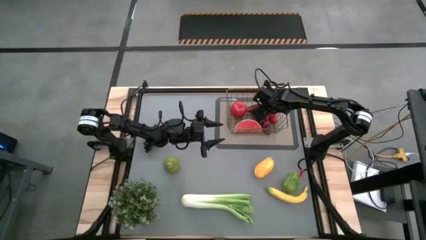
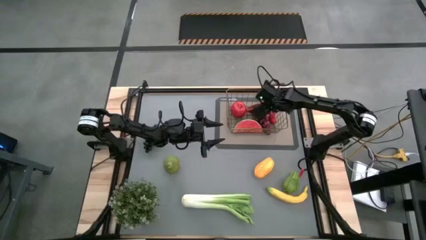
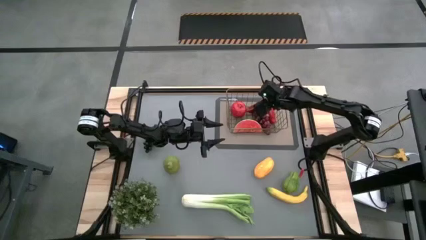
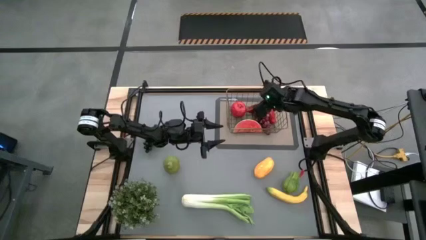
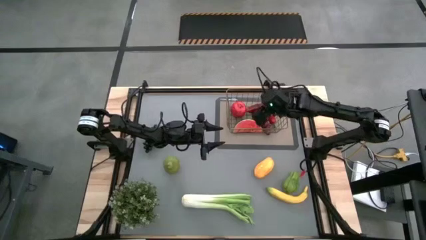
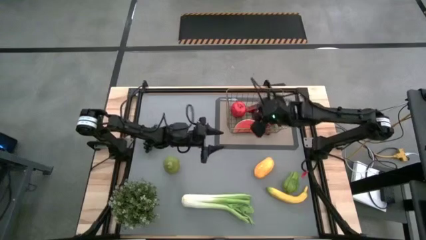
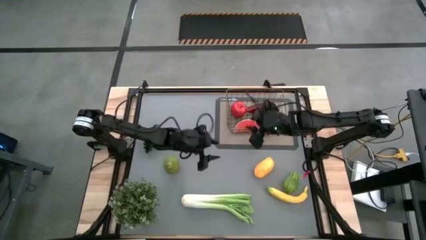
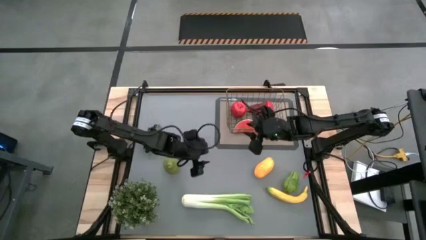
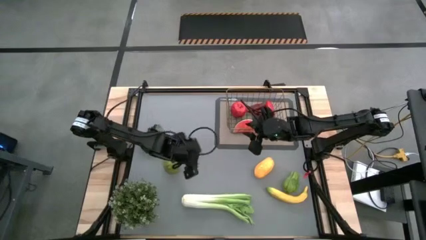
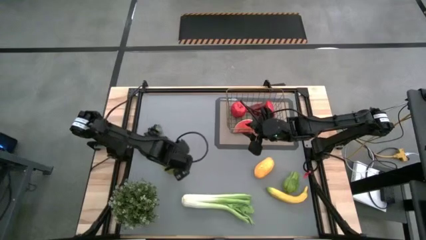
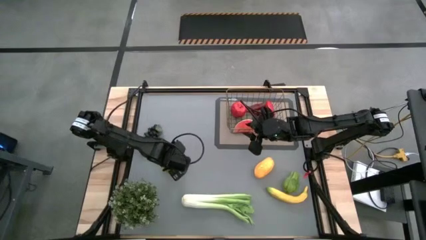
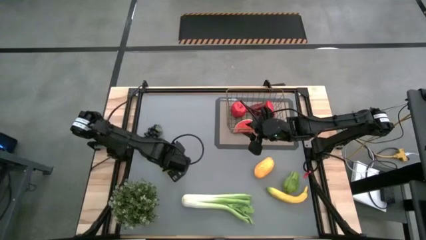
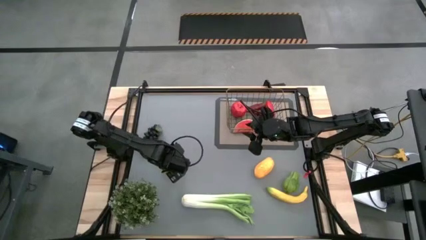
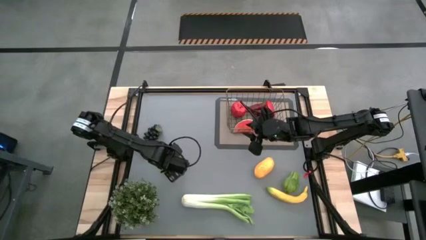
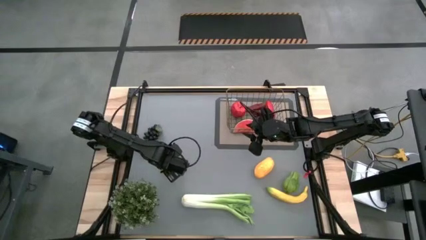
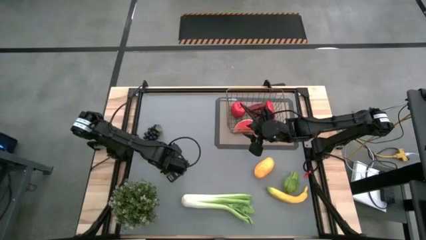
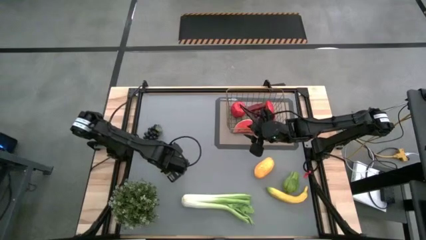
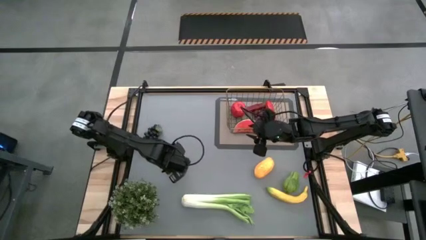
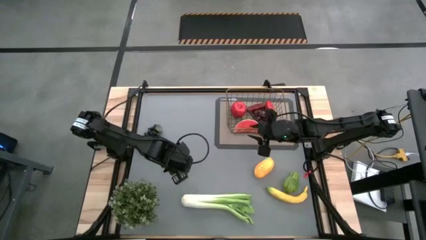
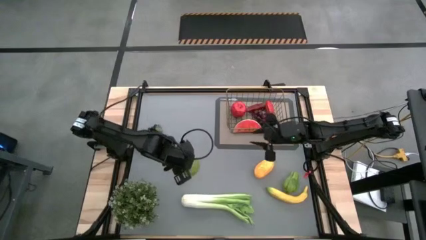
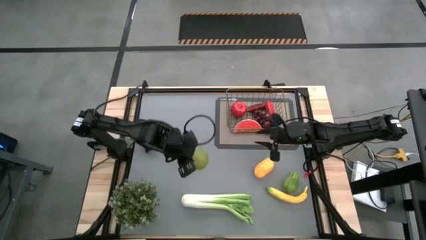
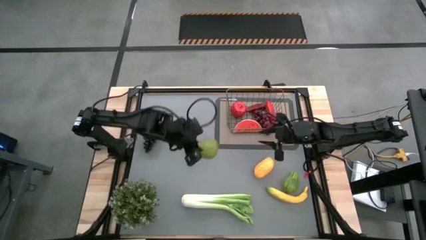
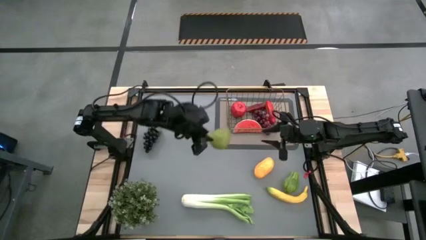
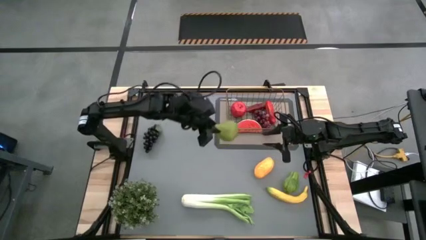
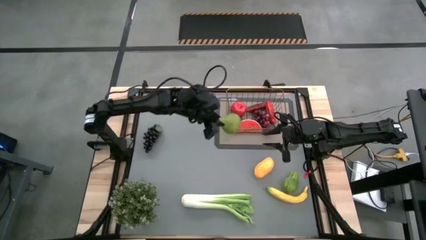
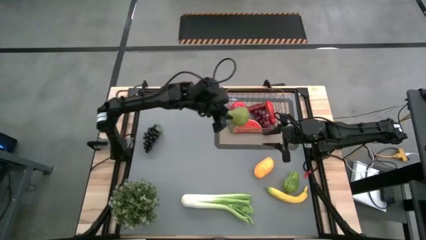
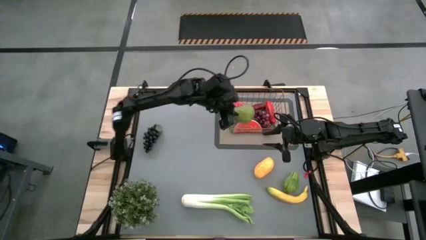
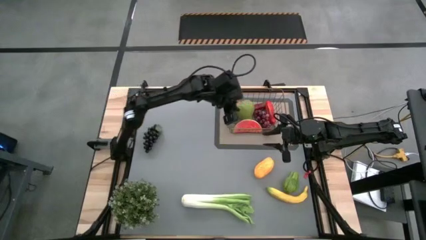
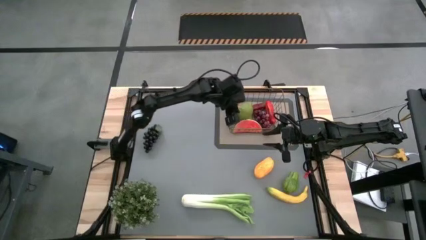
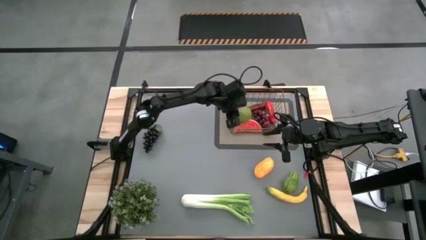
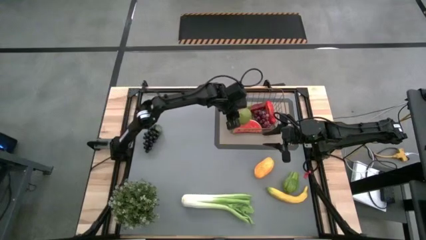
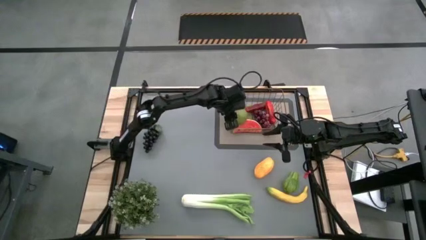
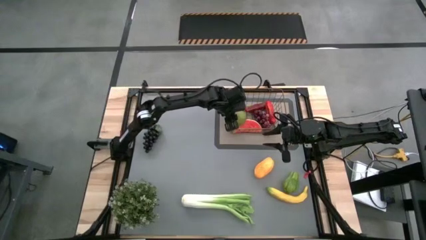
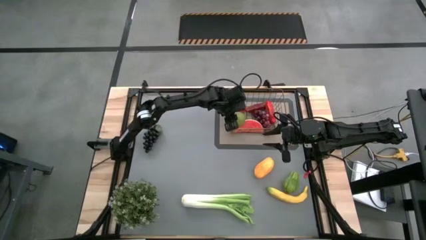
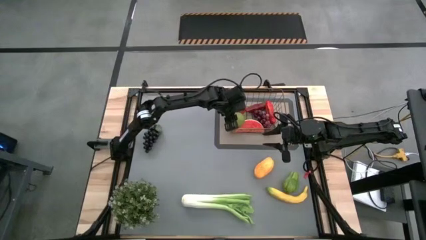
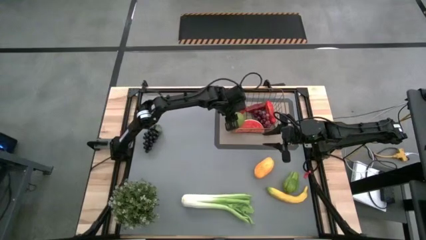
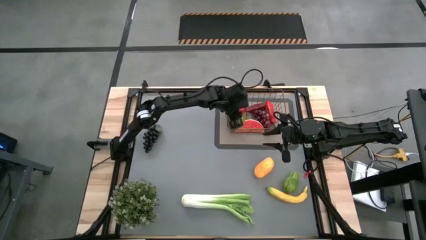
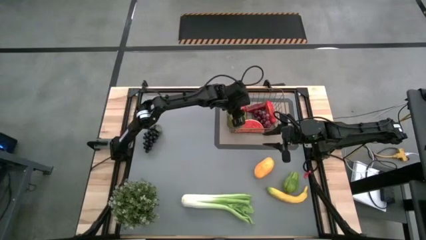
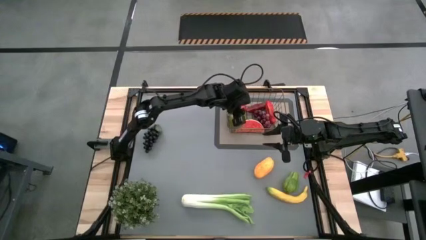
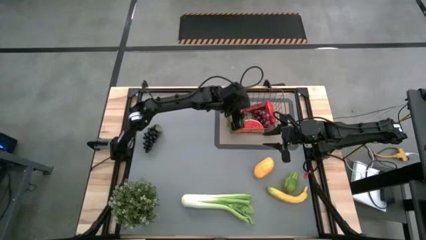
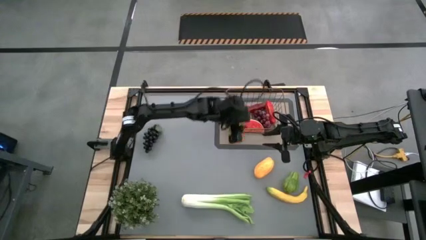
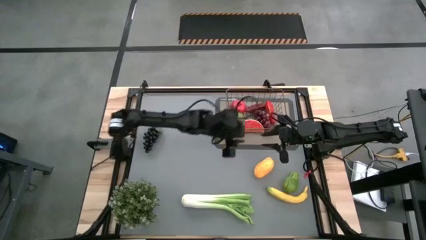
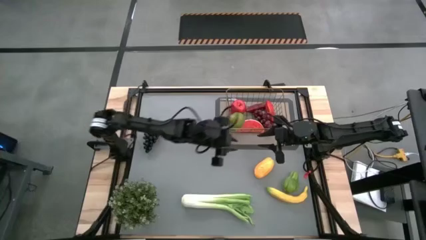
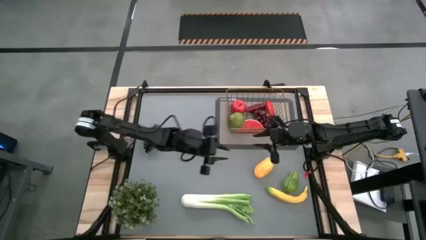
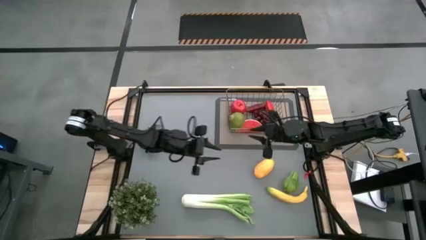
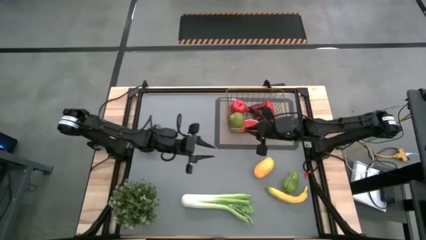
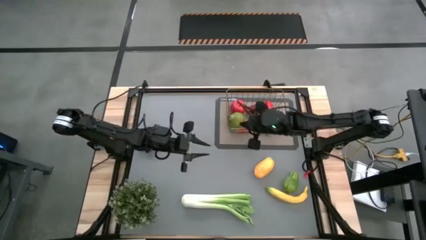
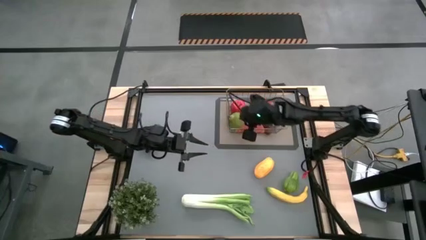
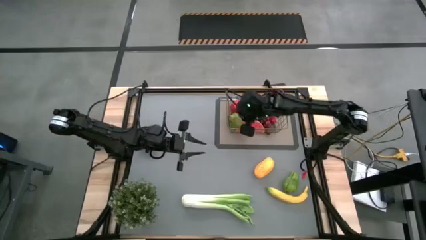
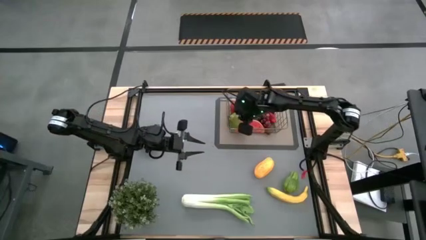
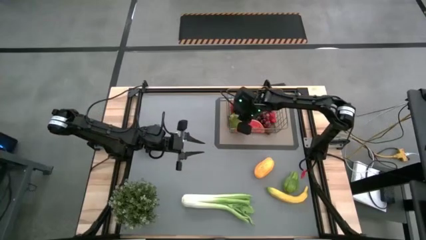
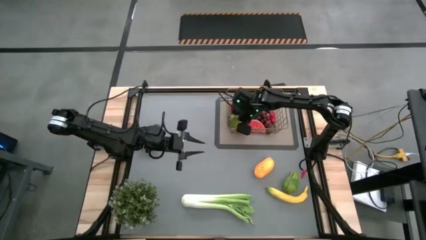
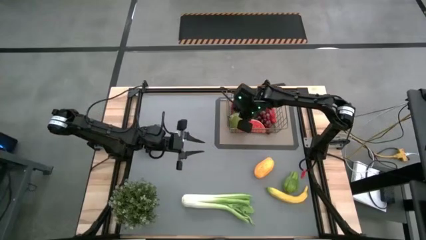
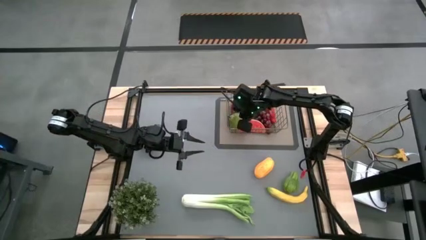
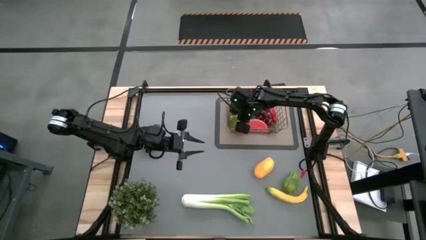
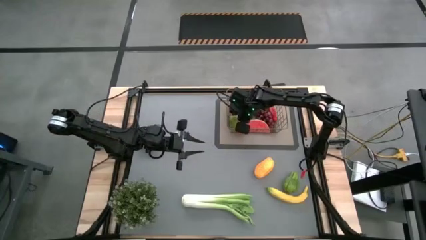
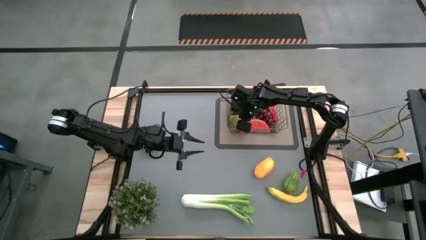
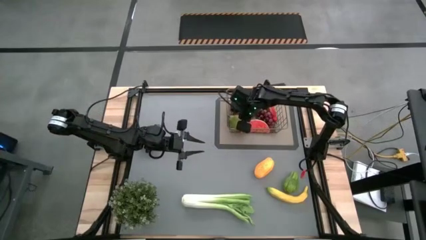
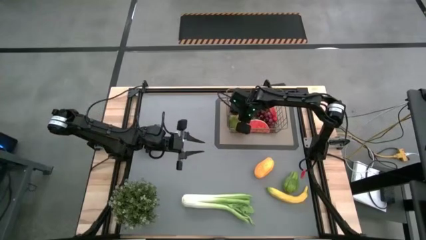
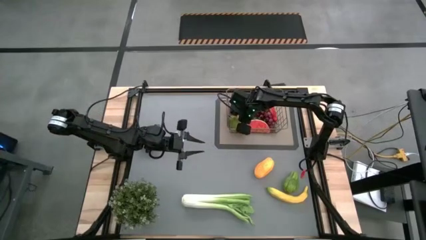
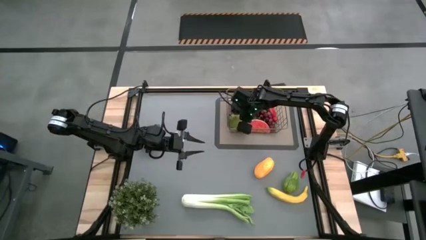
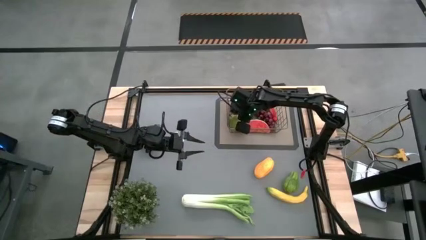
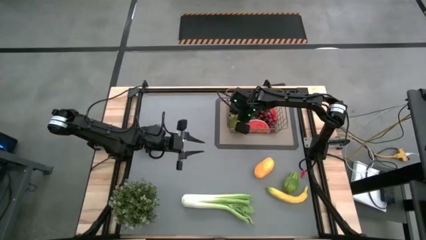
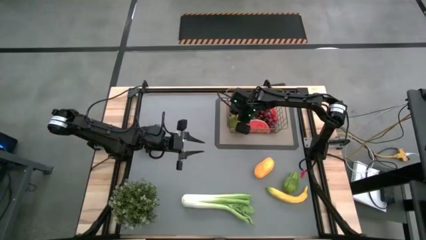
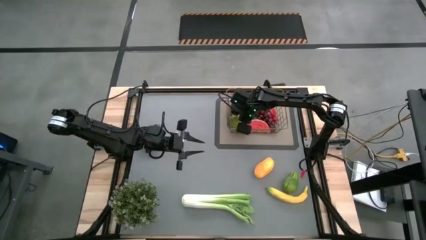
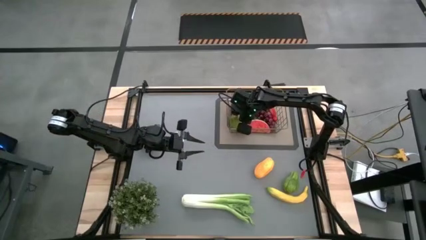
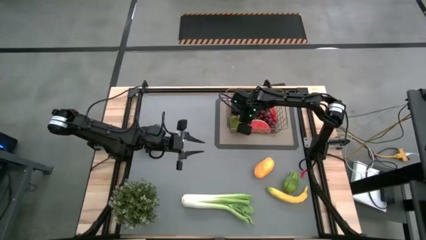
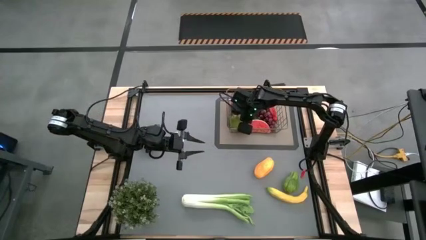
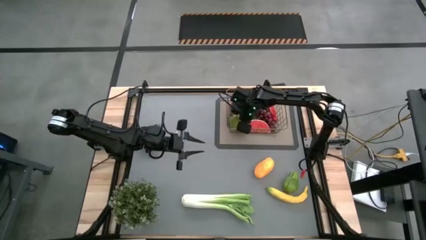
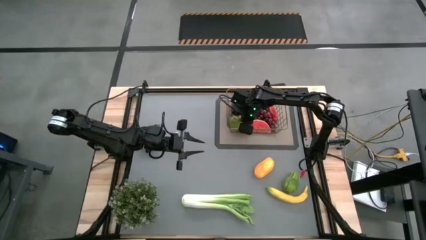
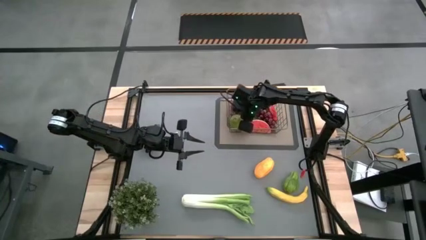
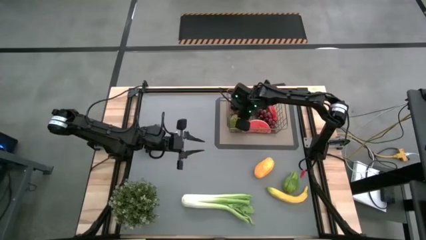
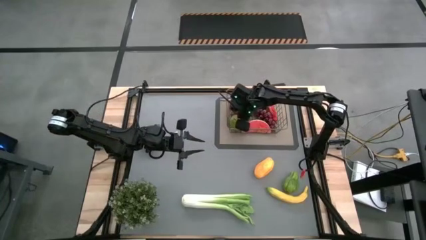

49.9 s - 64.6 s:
Task: Build produce basket
Put the pear into the wire basket

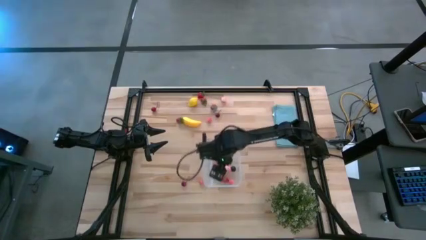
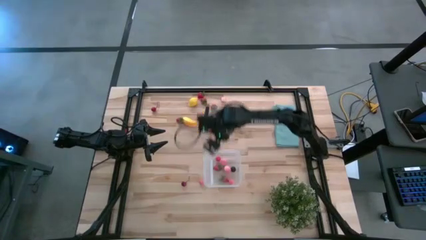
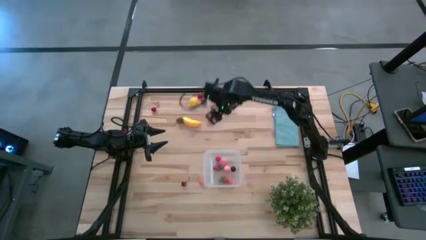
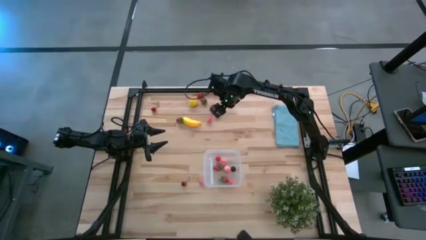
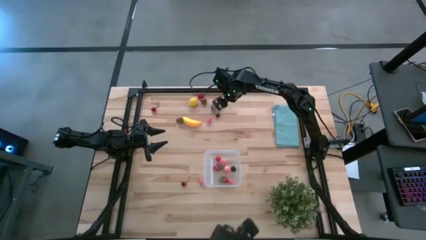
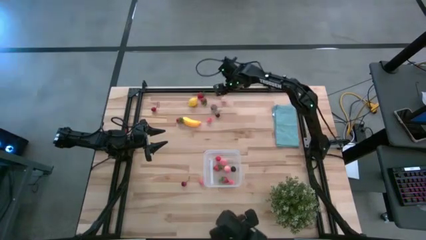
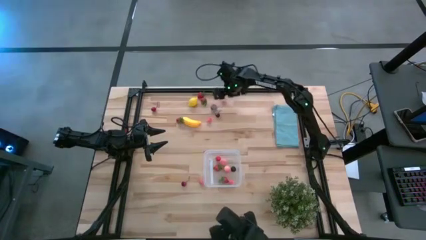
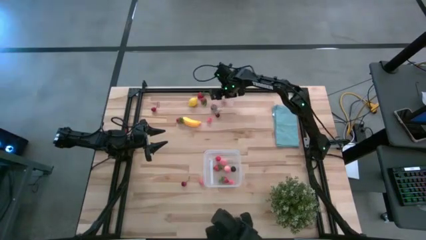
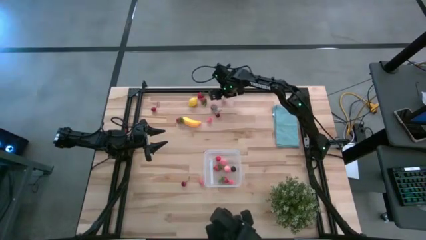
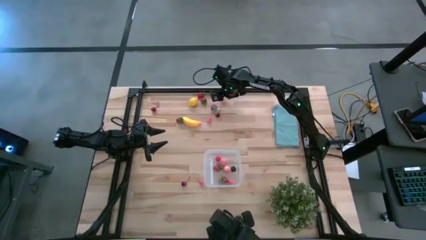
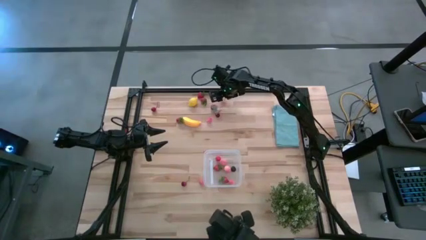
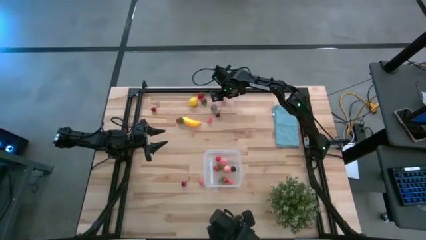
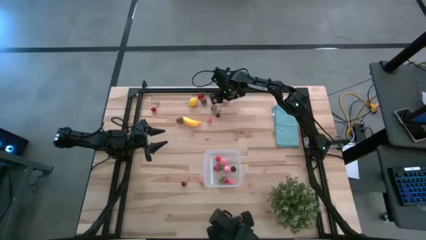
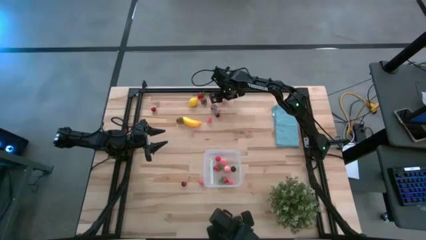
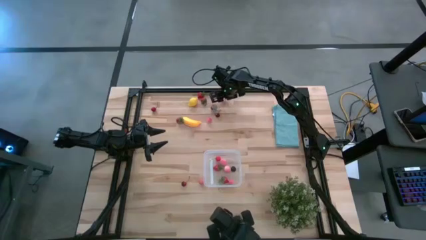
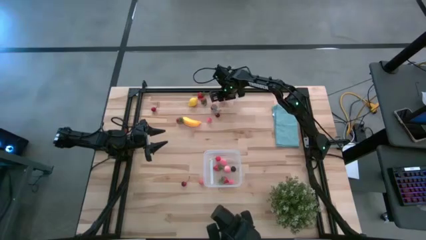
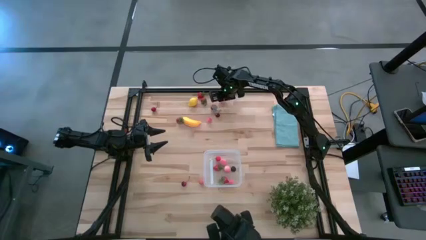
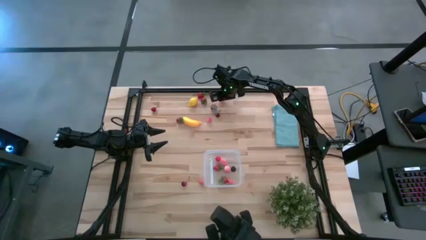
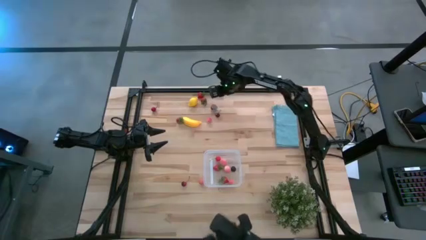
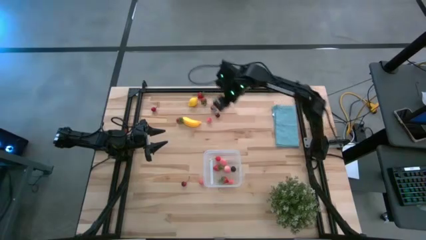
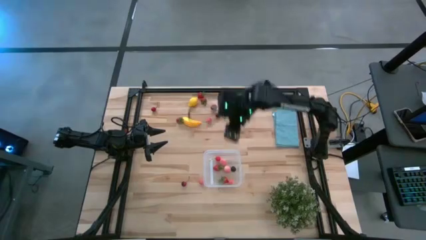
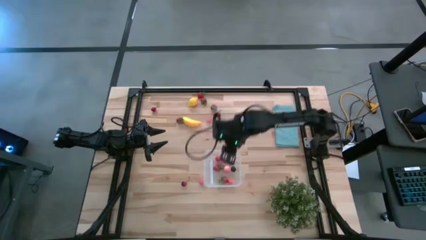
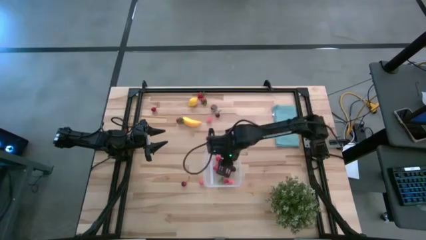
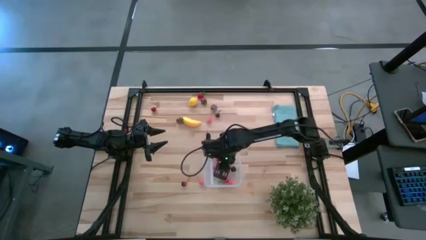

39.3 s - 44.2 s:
Task: Pick and placing Produce into tupperware
Put the pink peach into the transparent bin
